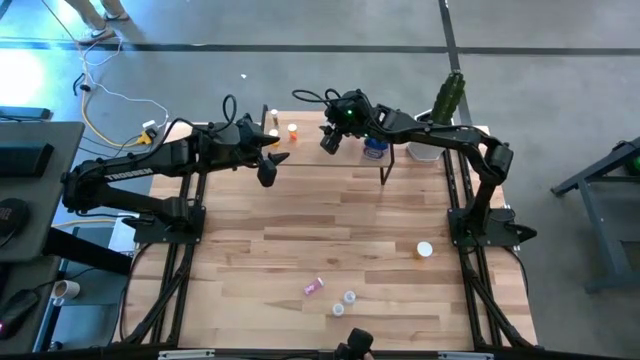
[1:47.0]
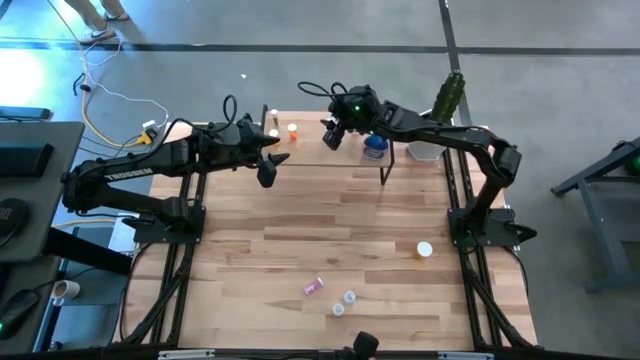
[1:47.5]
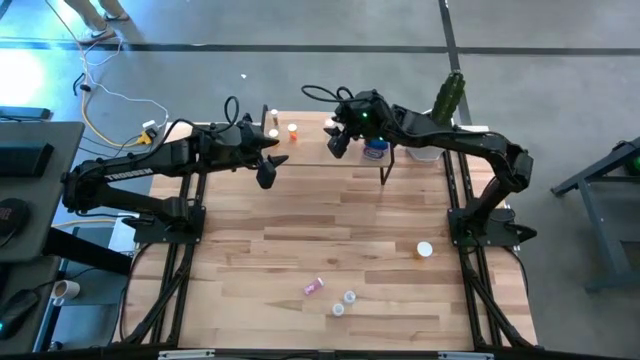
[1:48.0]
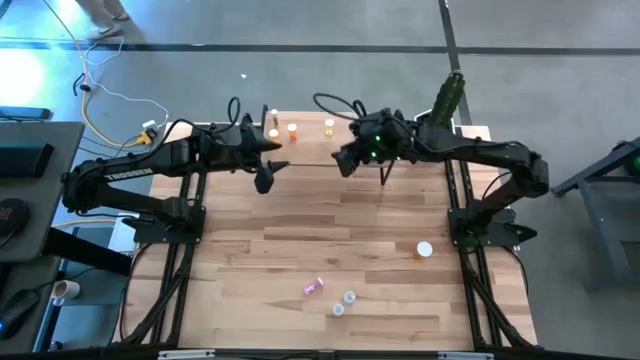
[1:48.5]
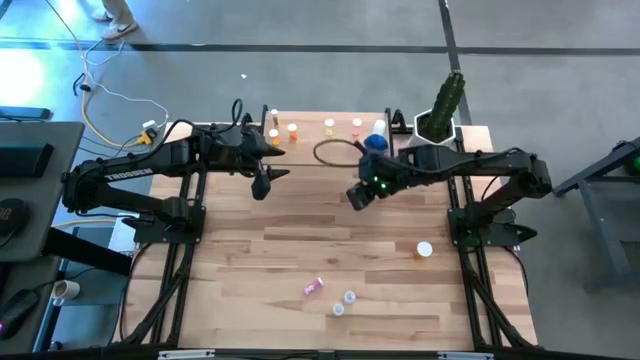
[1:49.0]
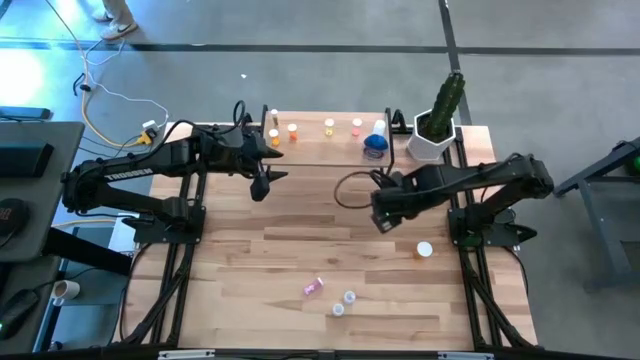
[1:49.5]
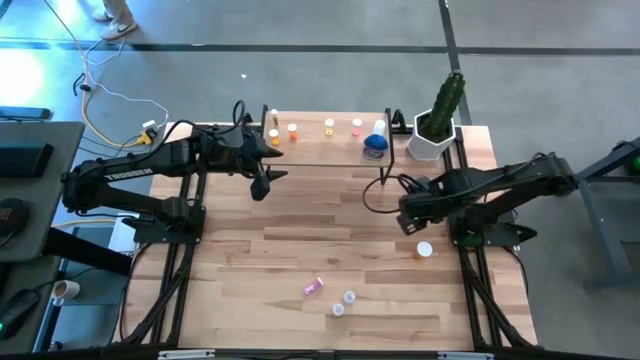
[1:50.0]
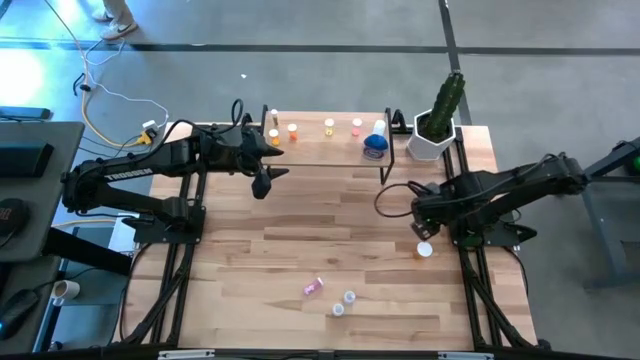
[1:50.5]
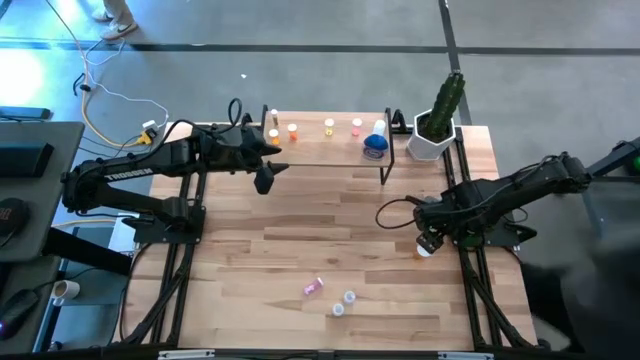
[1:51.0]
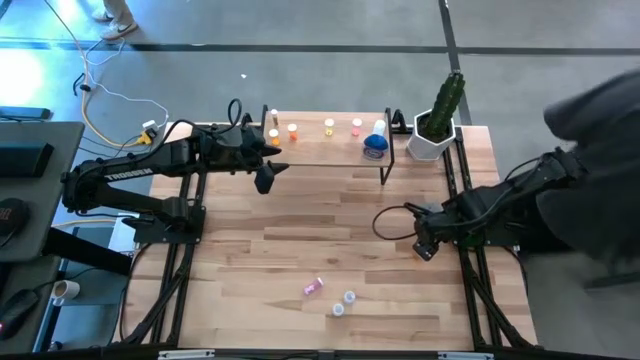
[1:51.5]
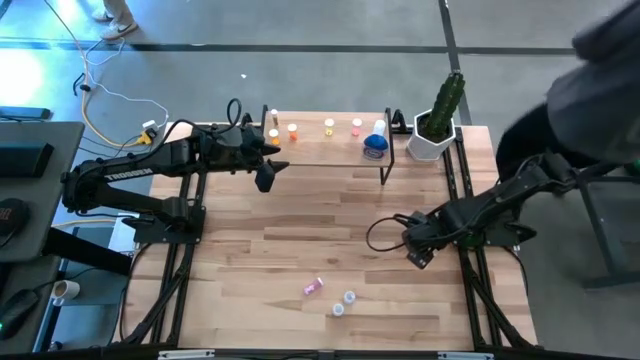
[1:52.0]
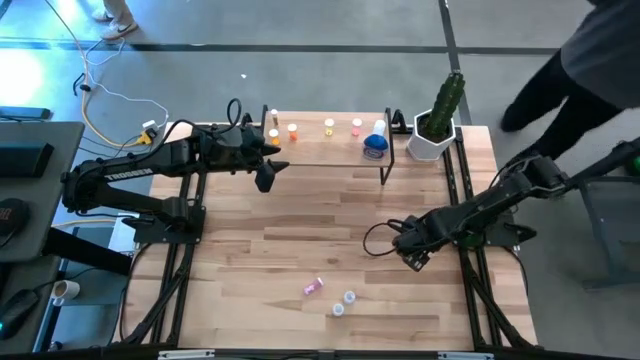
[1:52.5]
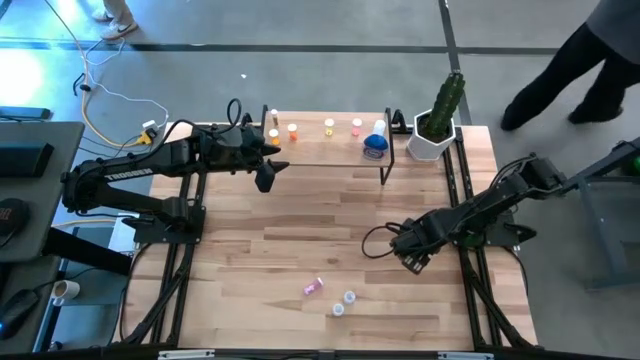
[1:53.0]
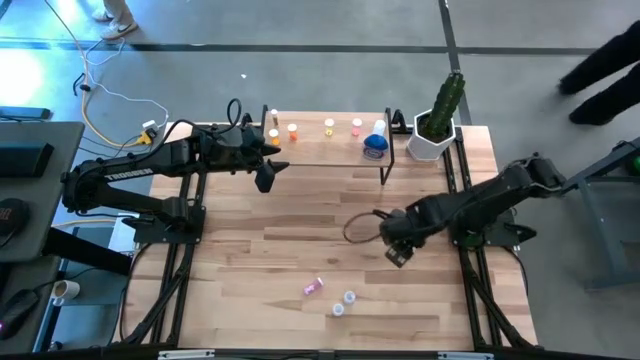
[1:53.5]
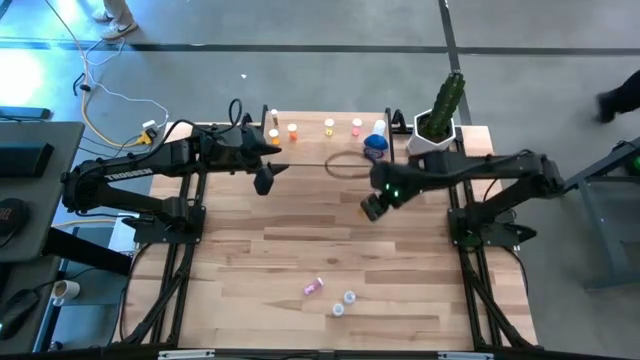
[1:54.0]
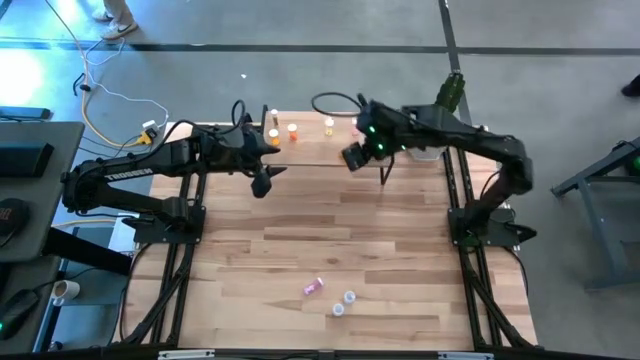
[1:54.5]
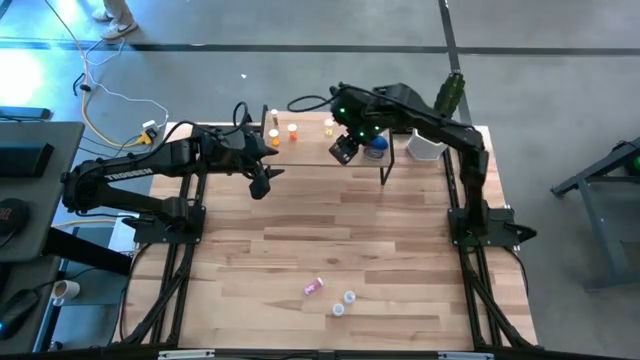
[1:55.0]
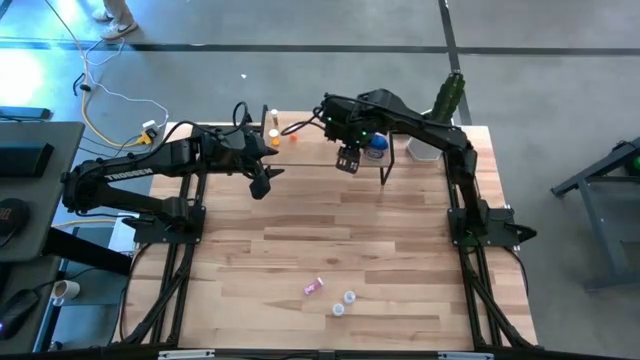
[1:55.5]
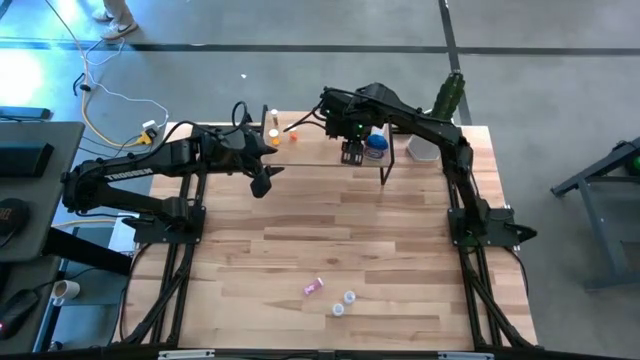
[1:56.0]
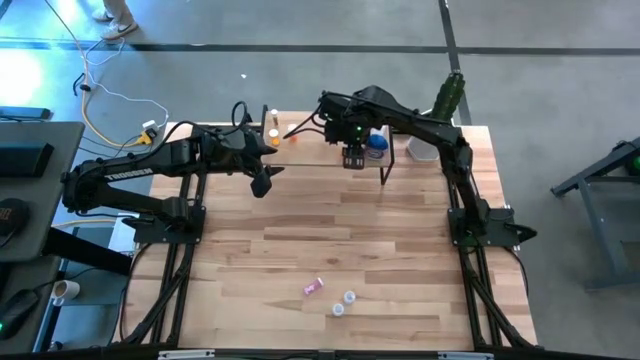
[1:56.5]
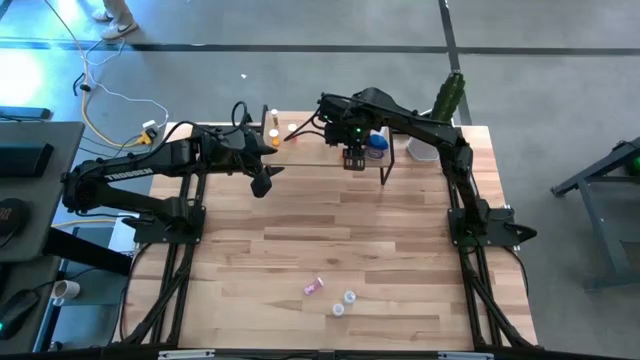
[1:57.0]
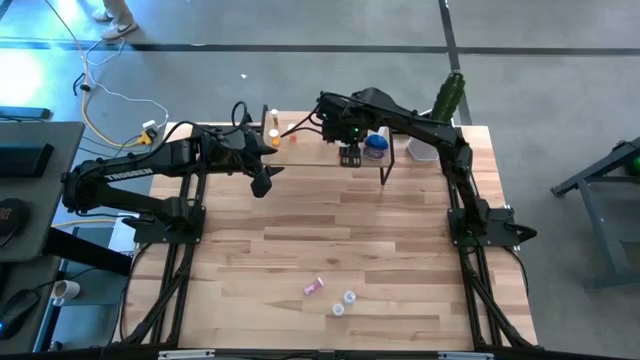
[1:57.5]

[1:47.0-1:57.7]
Task: Pick and place medicine bottles onto shelf by color
Put the orange bottle on the shelf

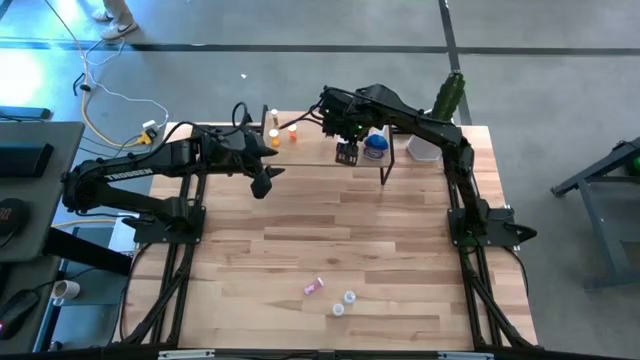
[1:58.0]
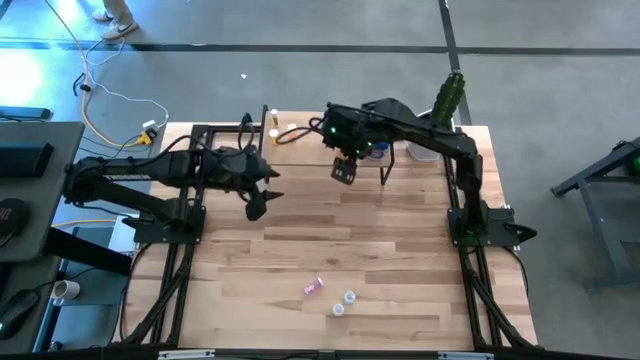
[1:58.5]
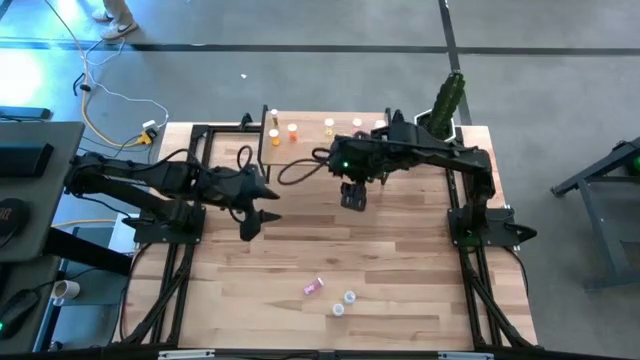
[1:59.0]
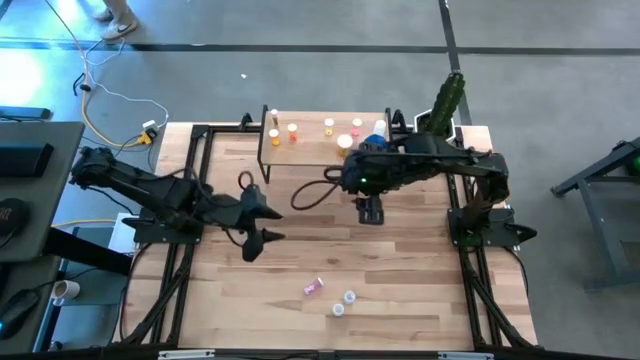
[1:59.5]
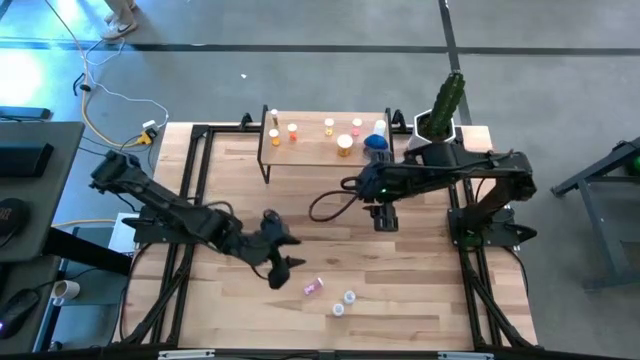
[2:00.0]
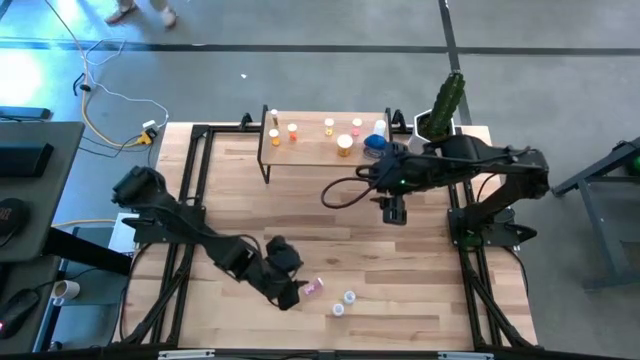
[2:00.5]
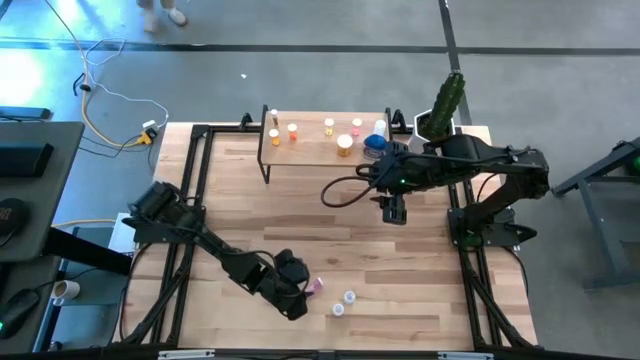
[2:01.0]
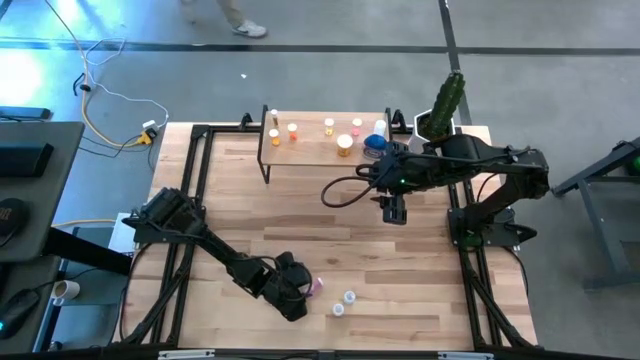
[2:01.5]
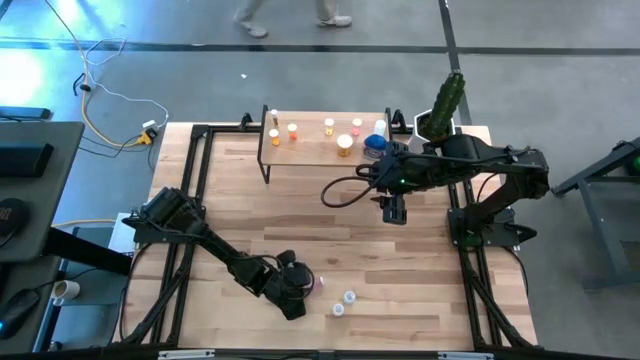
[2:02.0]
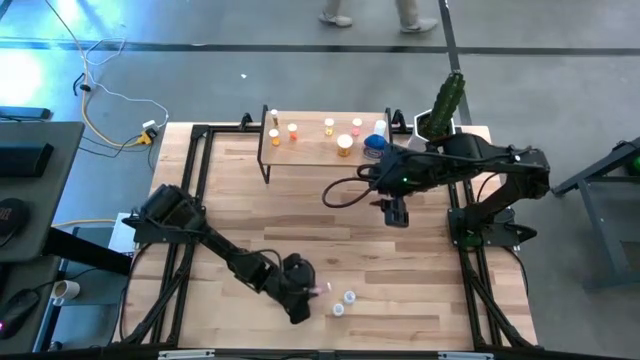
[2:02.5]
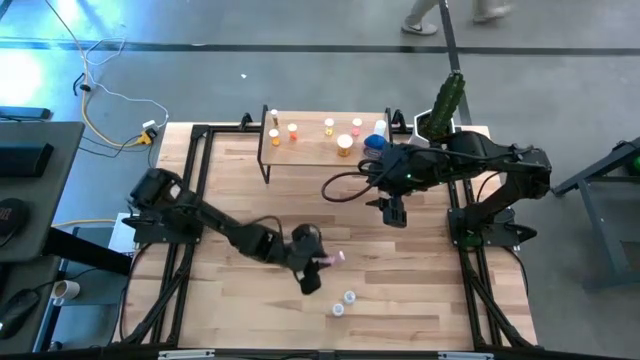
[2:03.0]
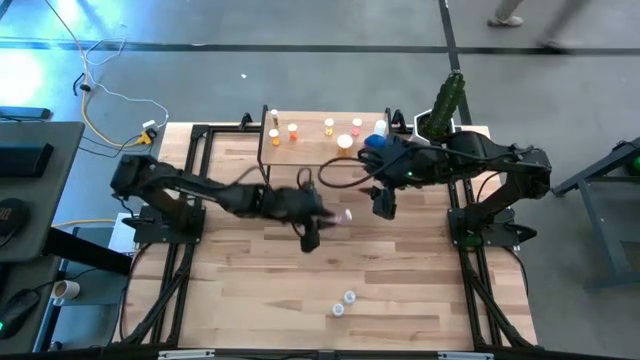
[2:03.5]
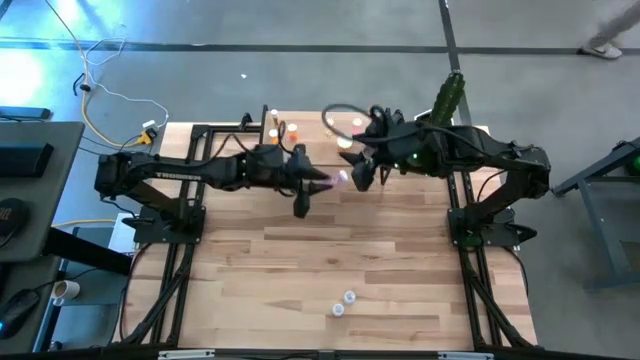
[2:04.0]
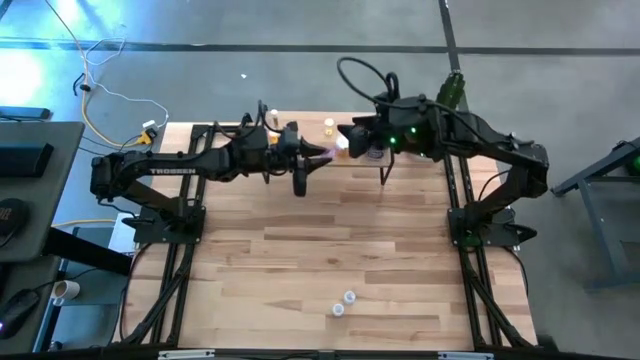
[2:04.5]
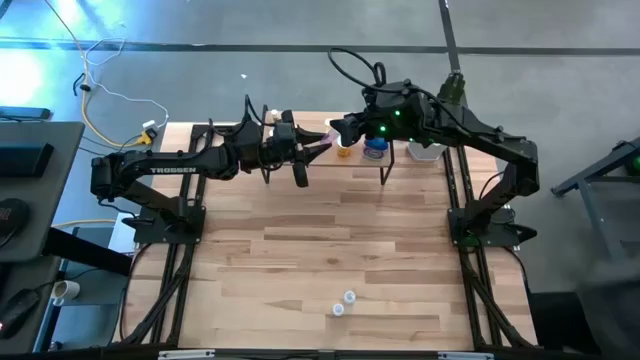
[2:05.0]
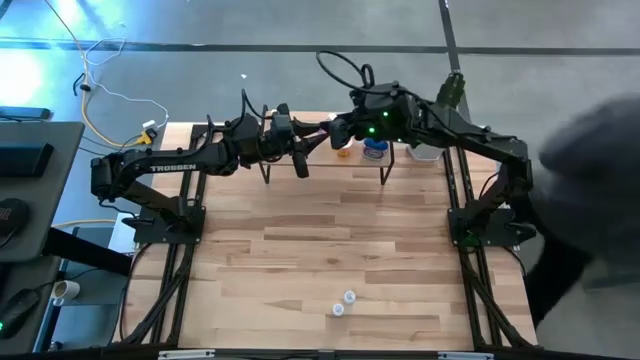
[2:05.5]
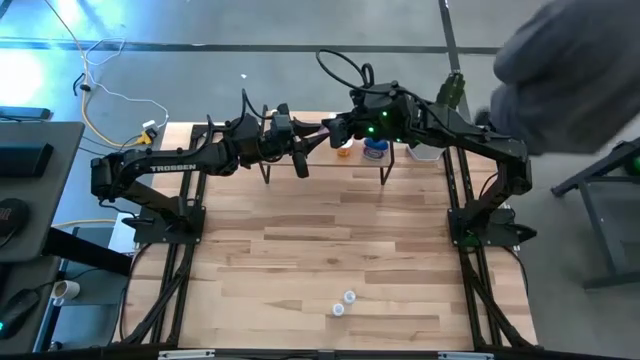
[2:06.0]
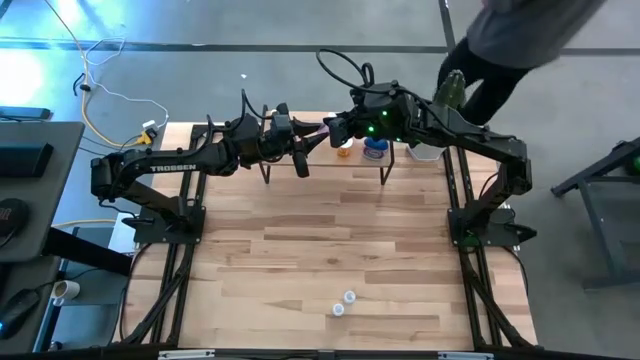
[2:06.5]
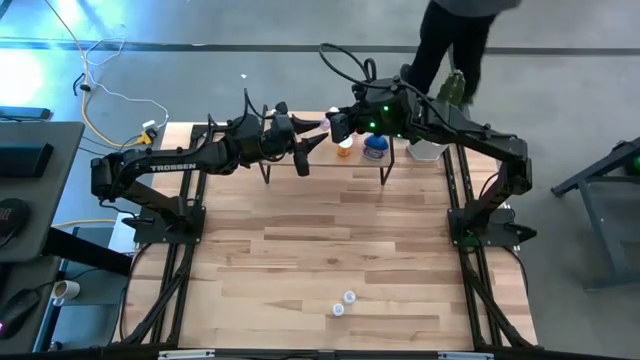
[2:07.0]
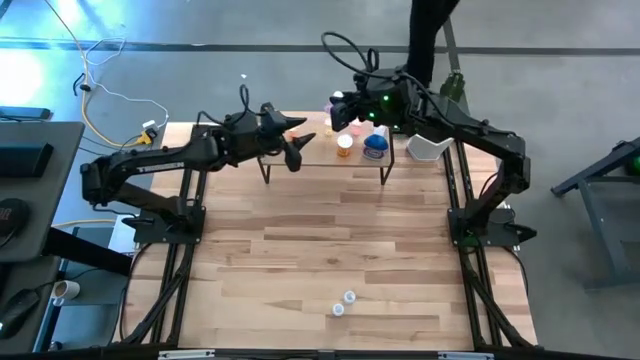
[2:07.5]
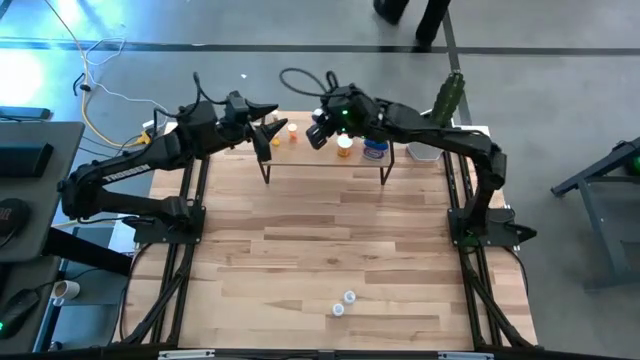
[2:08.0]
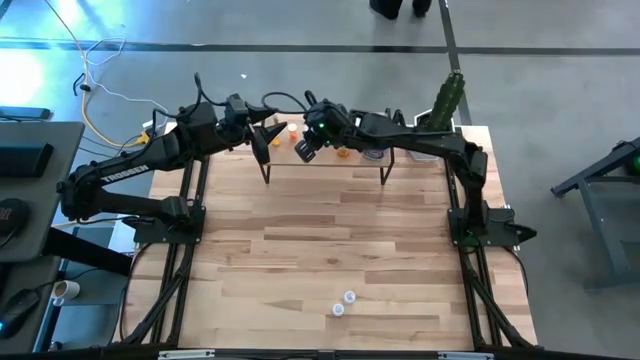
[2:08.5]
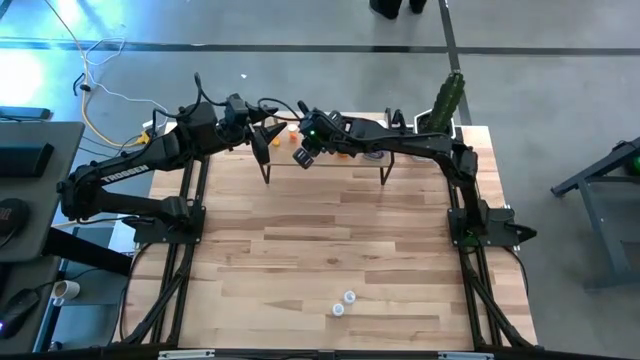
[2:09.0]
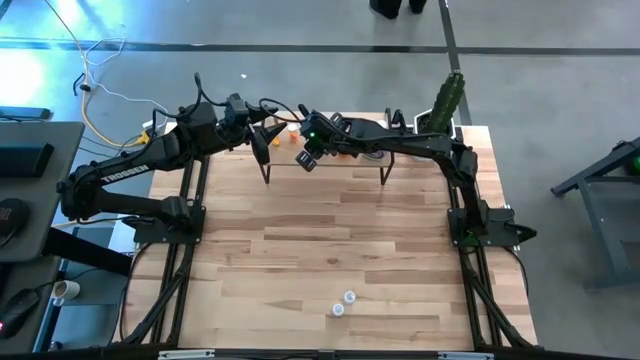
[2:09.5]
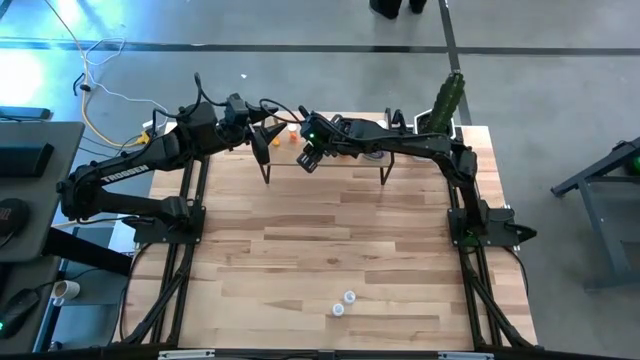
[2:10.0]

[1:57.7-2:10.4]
Put the pink pill bottle on the shelf
